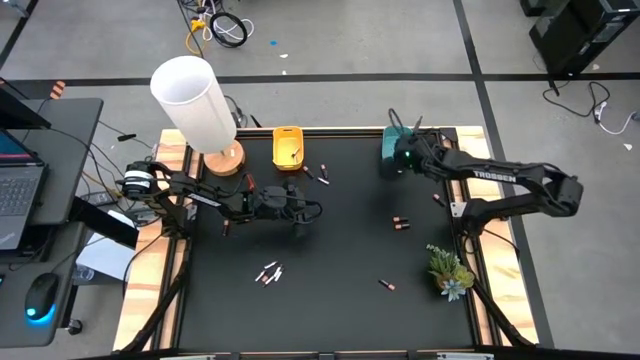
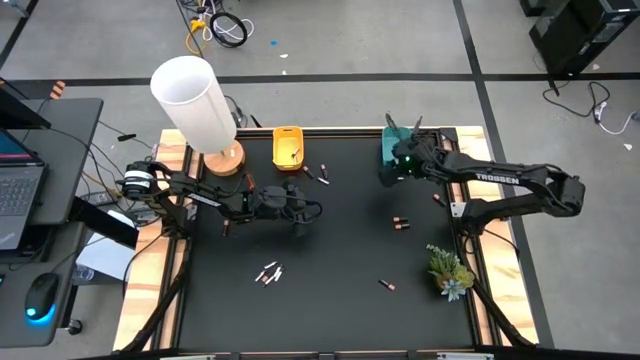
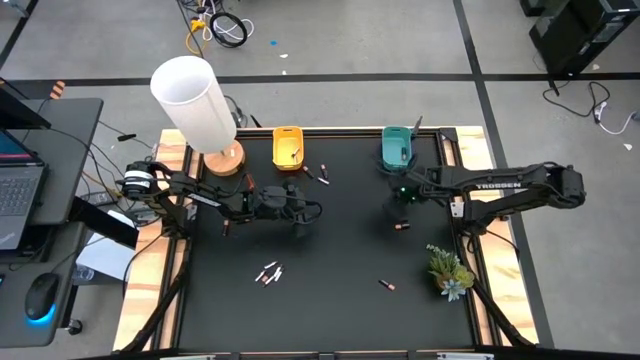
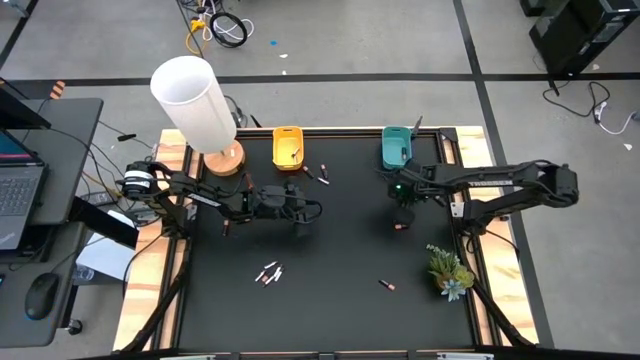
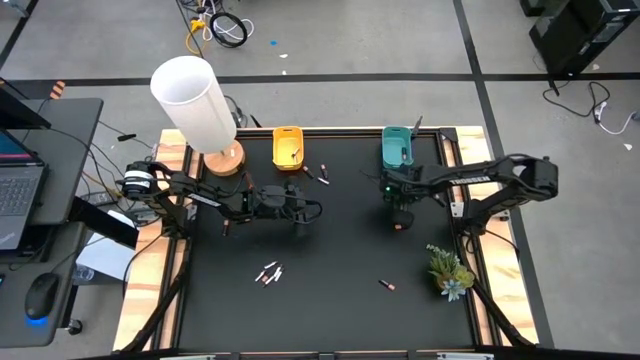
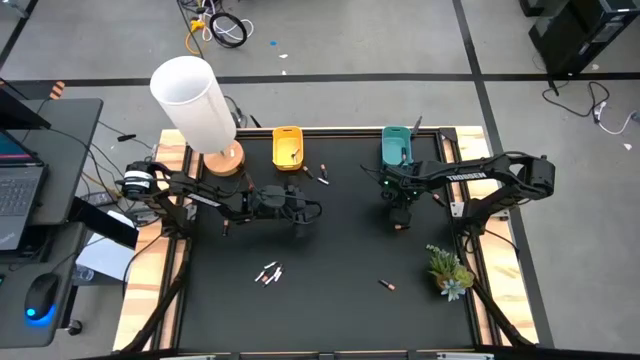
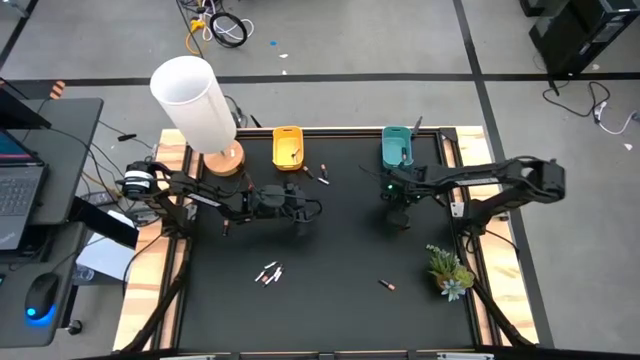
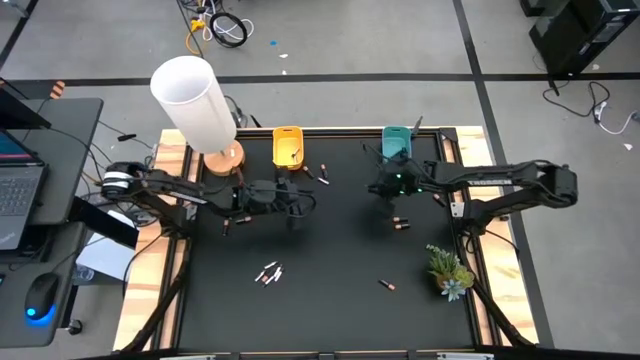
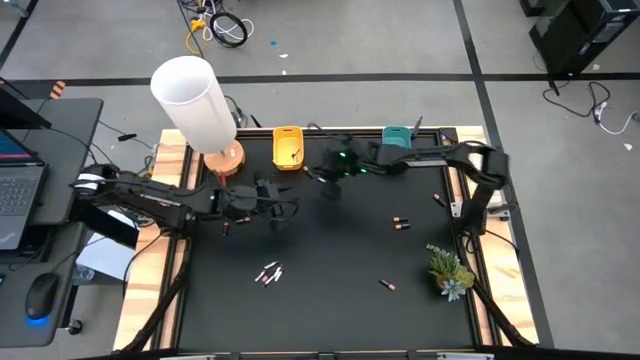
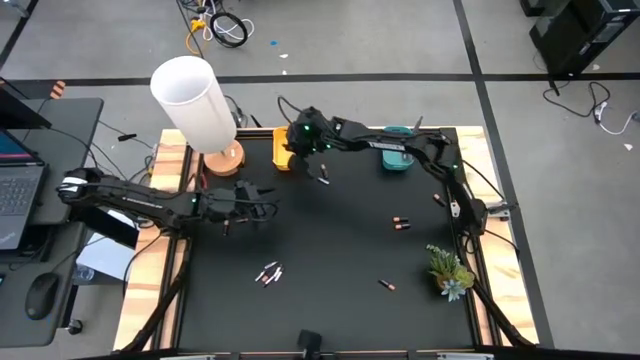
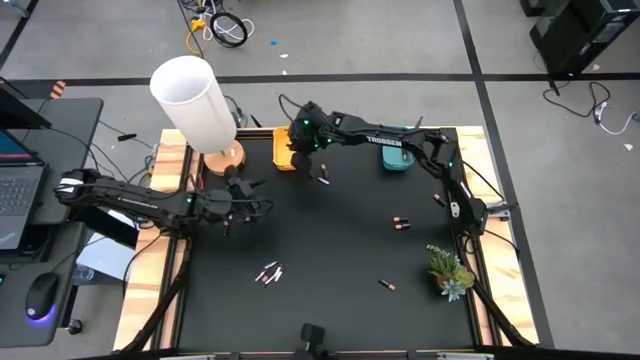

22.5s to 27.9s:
Task: Sort batteries
Put the silver battery into the yellow bin

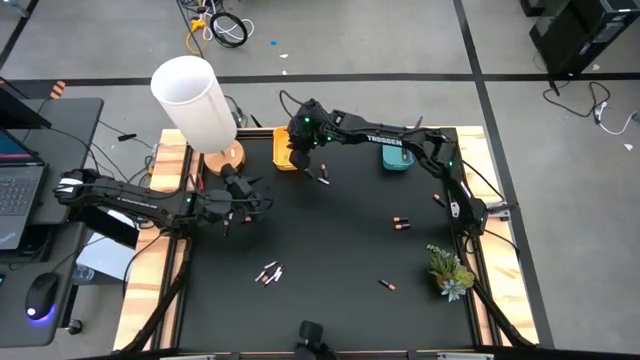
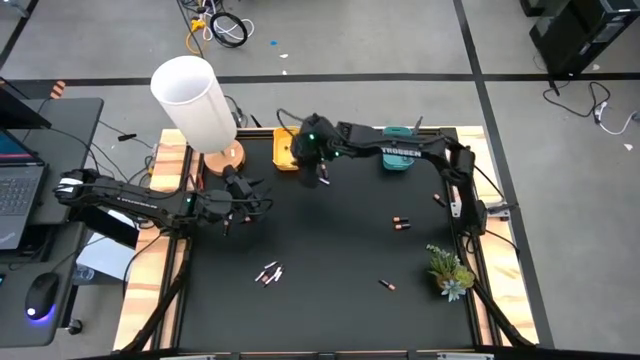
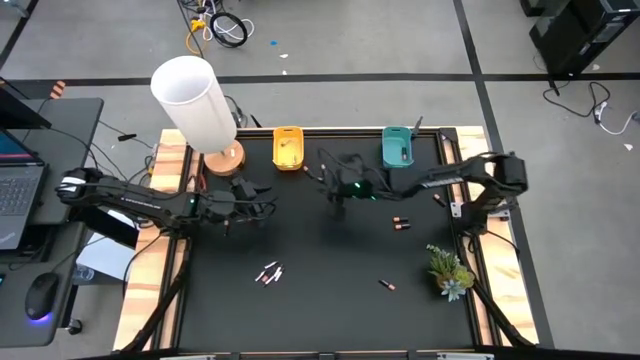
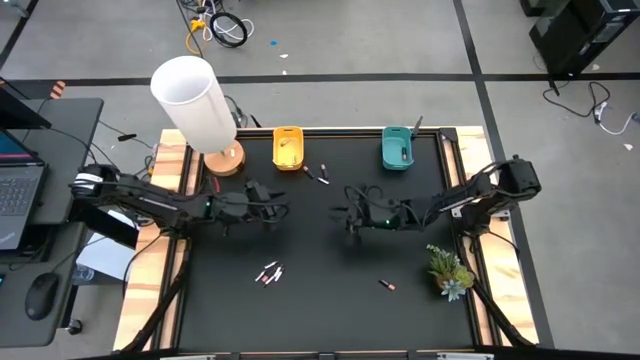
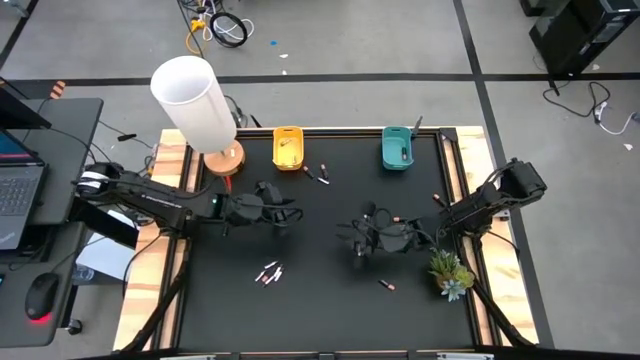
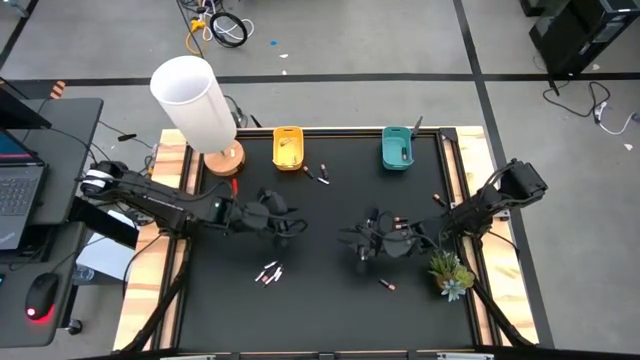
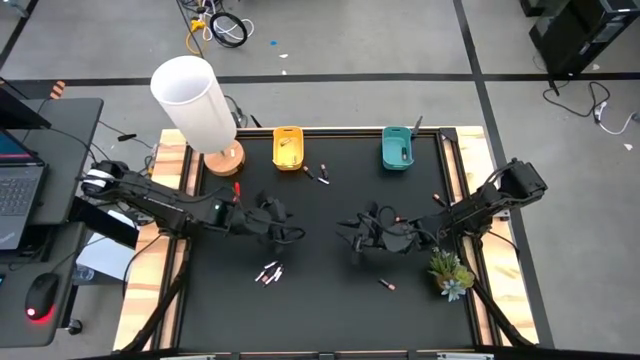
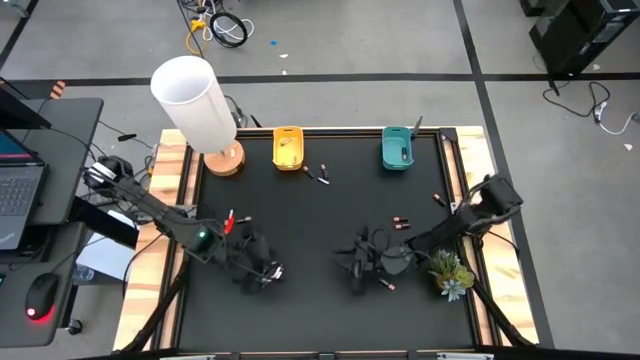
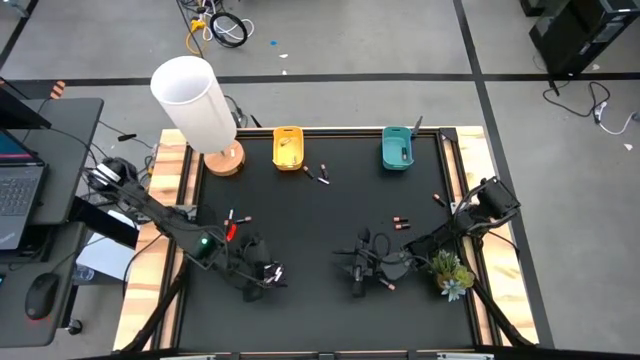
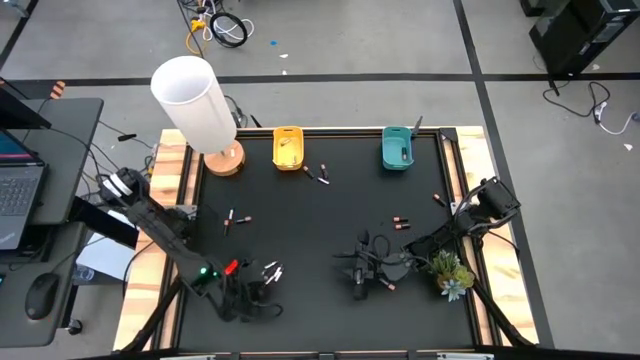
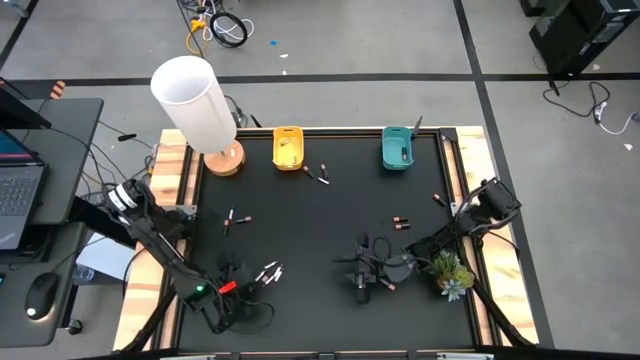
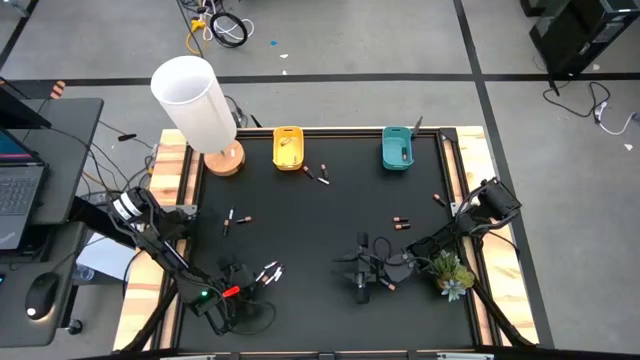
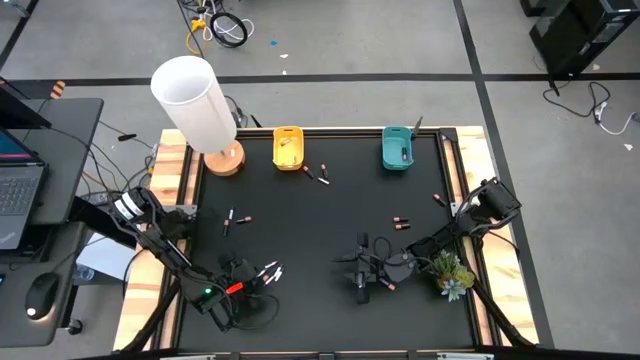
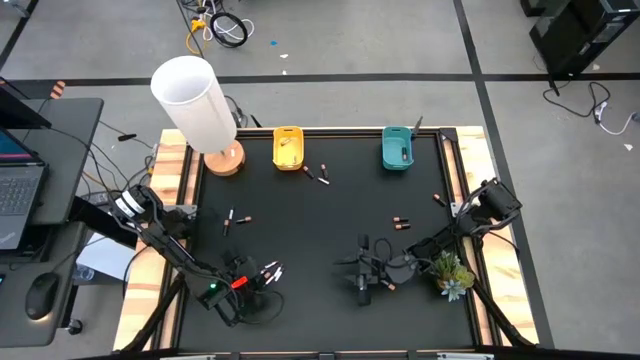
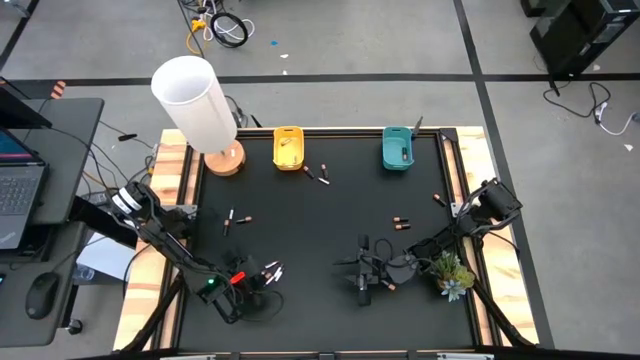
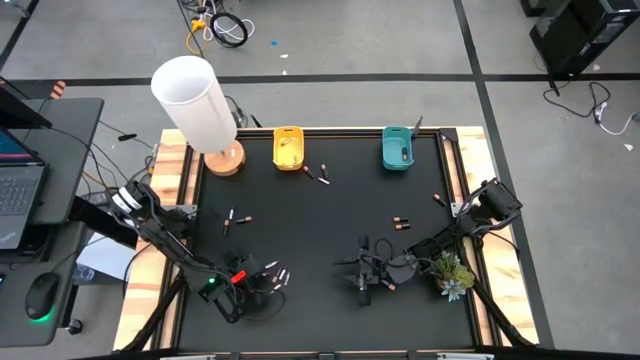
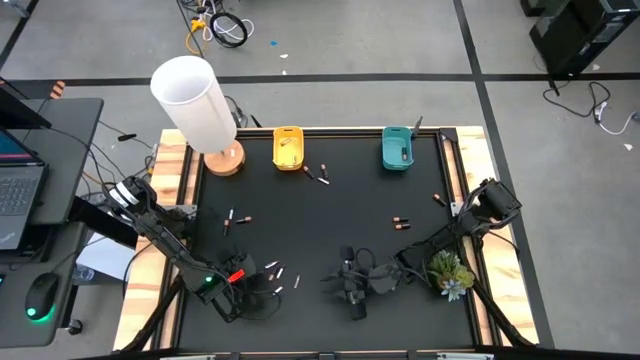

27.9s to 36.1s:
Put the silver battery into the yellow bin

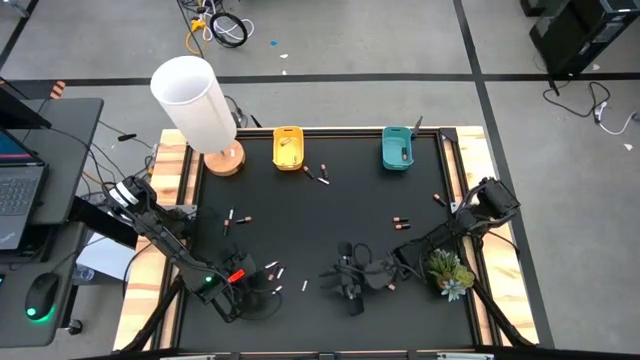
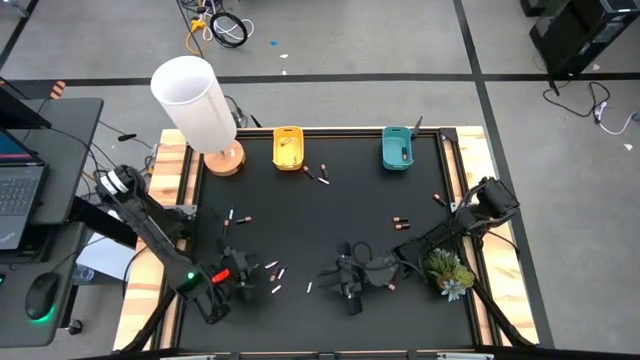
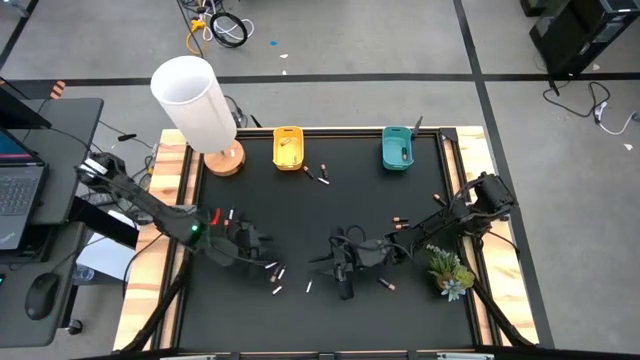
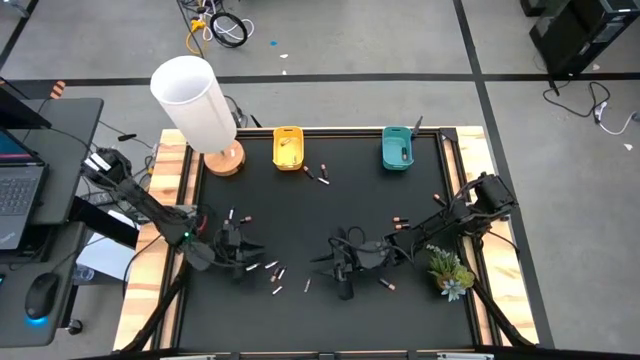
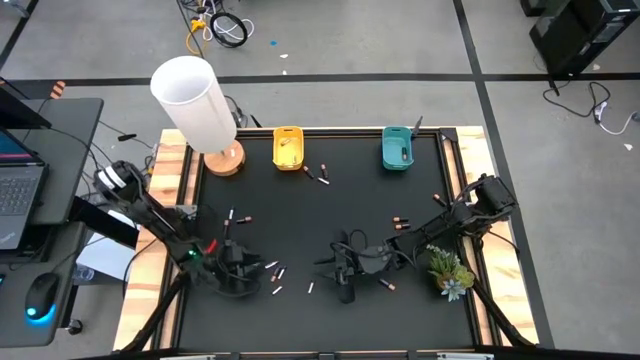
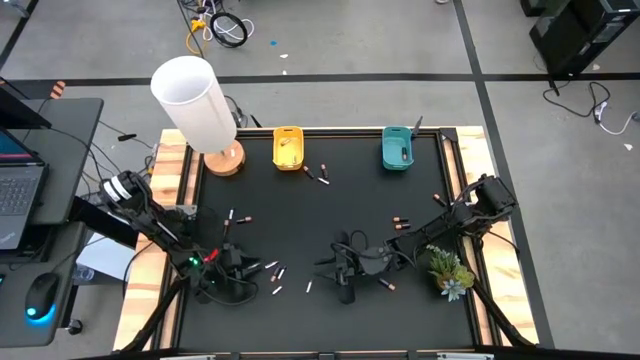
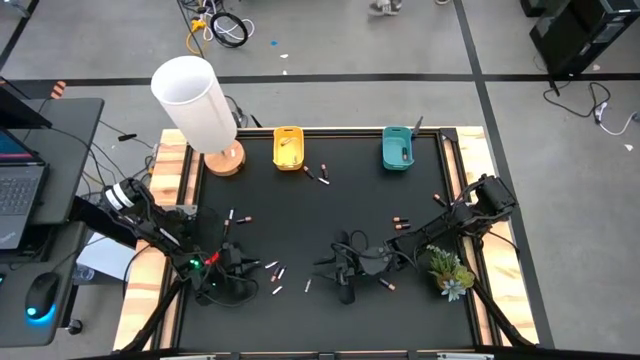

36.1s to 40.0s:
Put the silver battery into the yellow bin

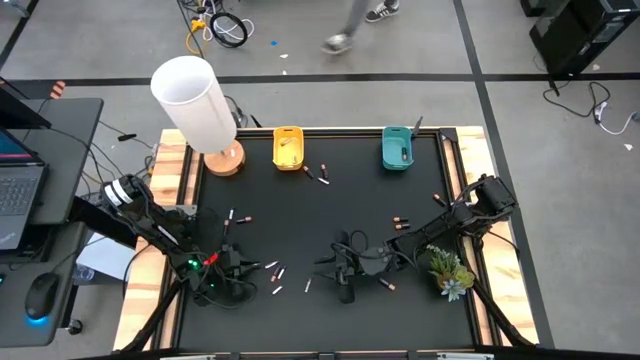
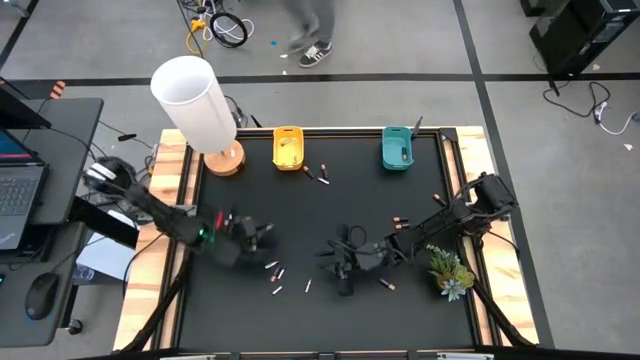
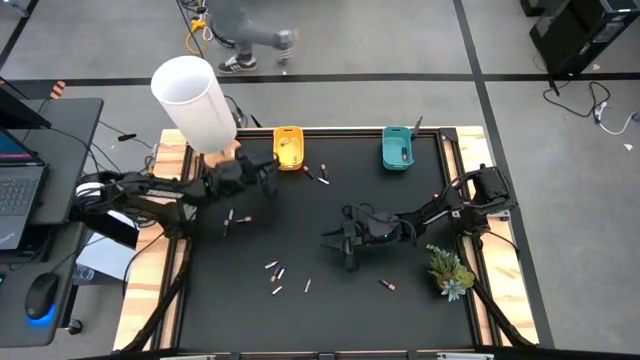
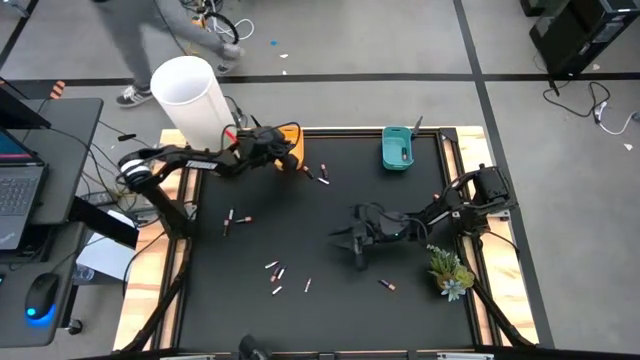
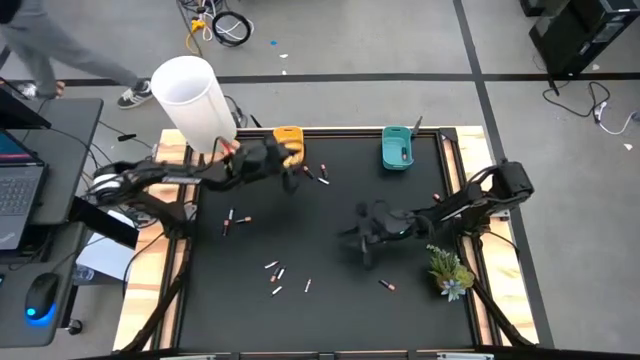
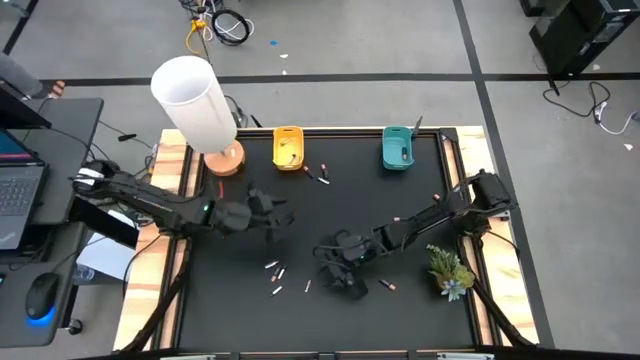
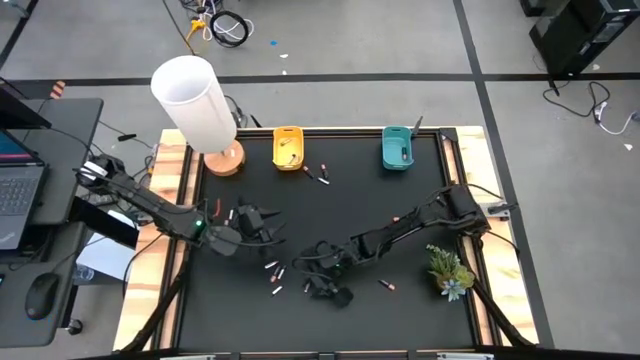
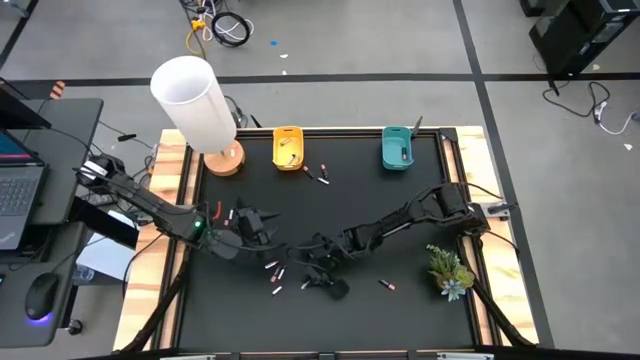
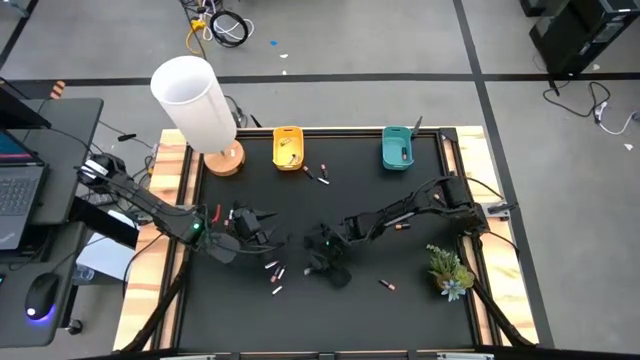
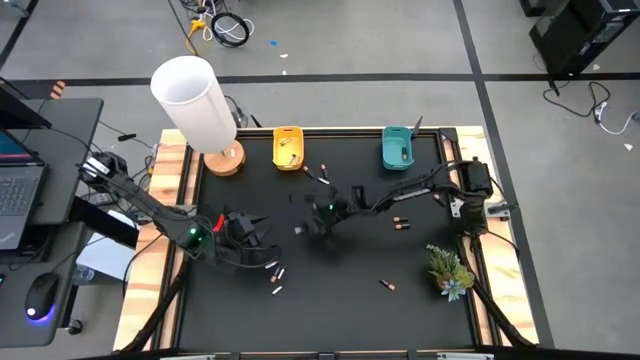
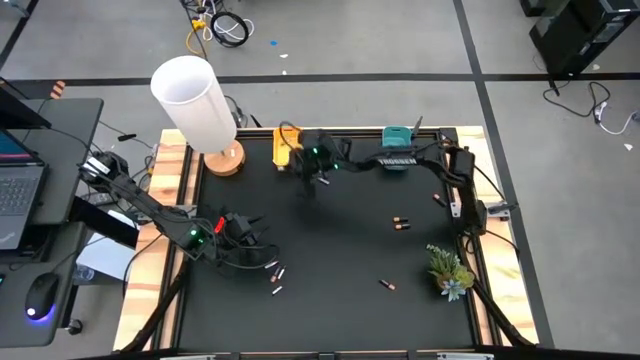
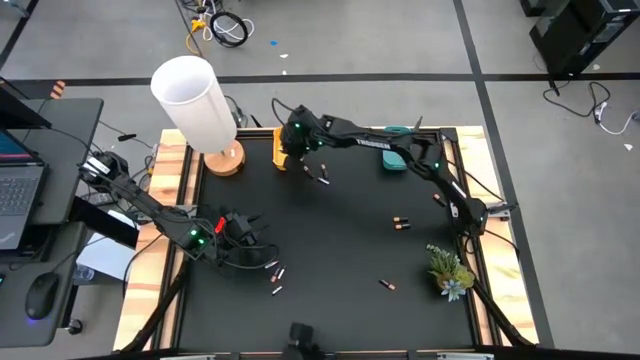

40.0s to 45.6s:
Put the silver battery into the yellow bin
